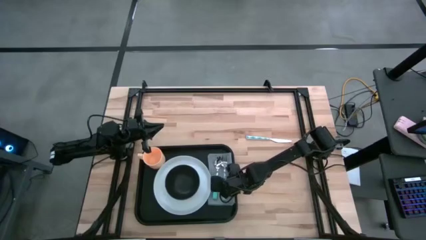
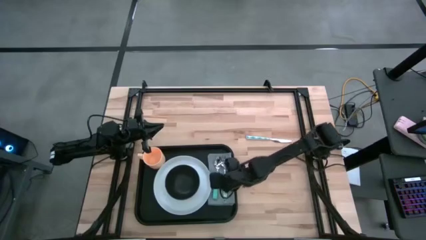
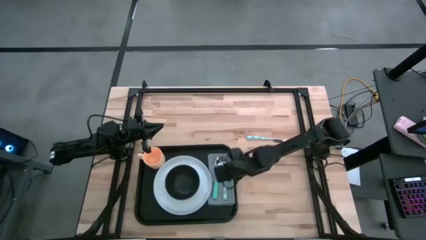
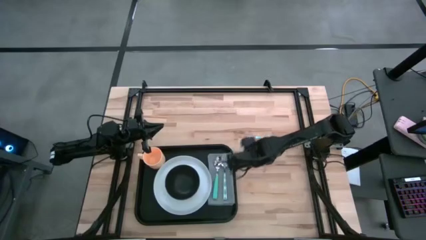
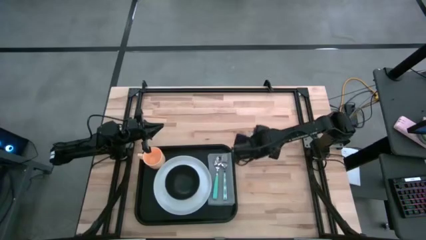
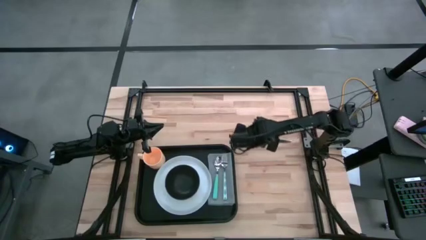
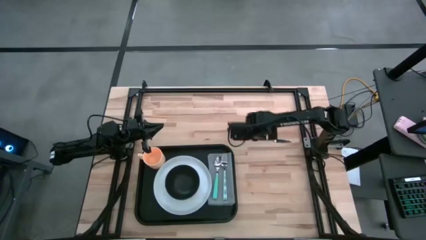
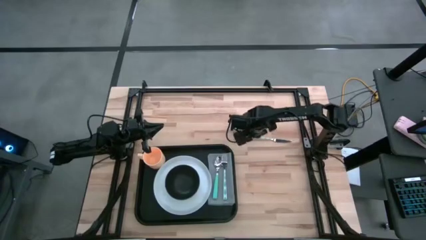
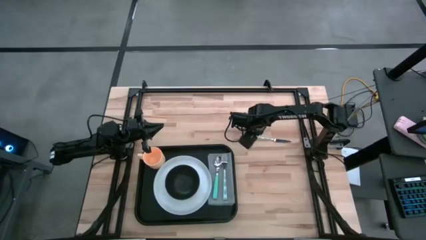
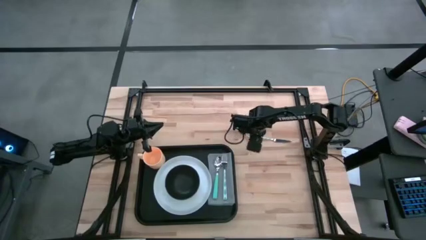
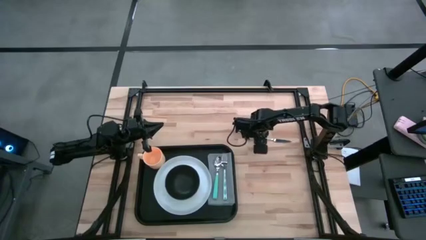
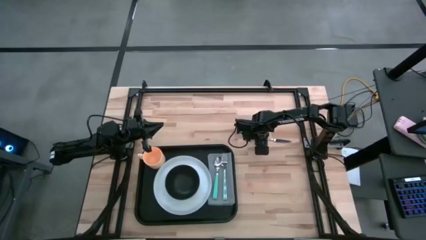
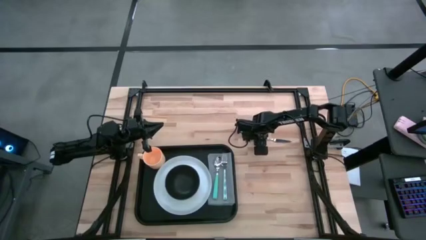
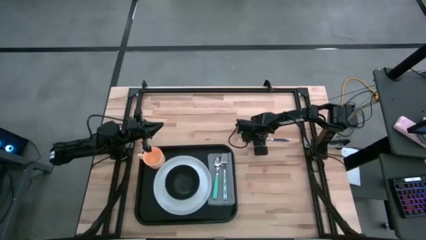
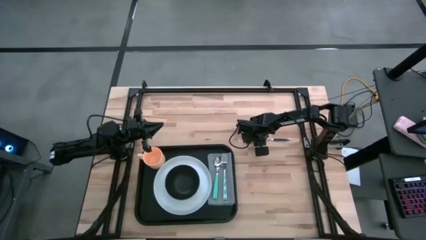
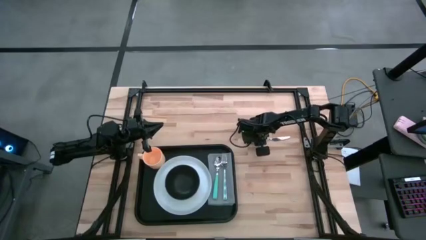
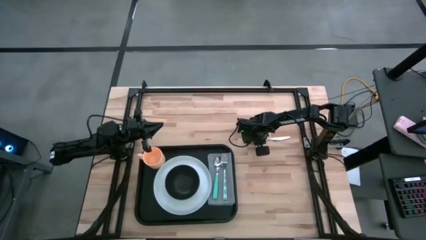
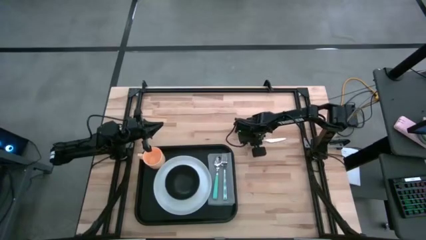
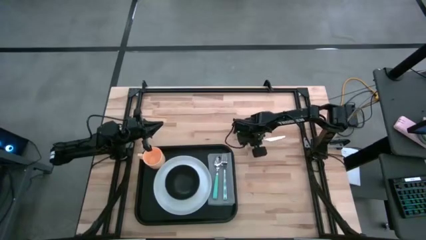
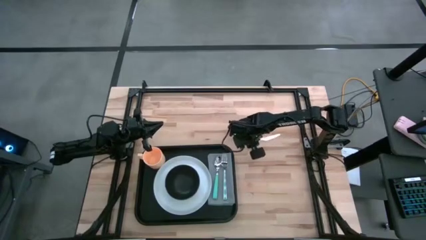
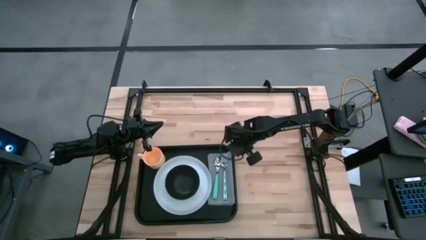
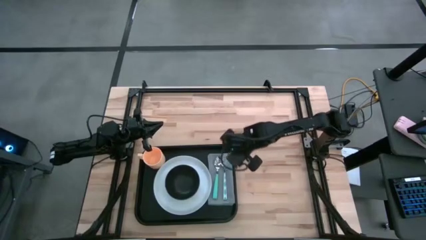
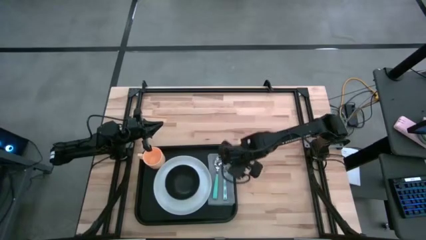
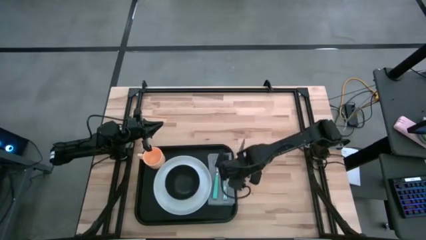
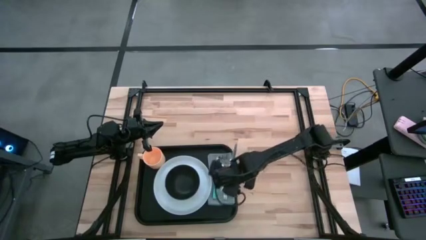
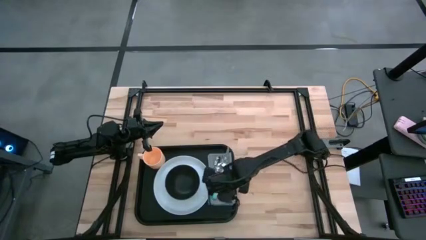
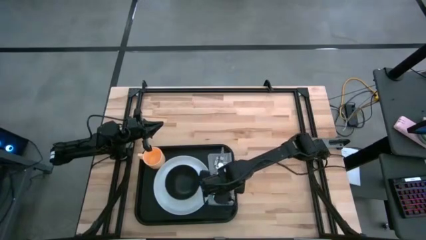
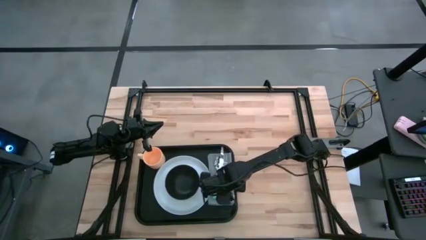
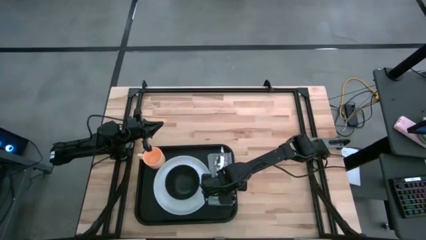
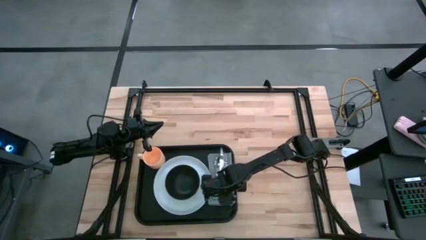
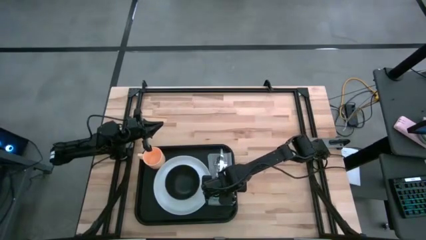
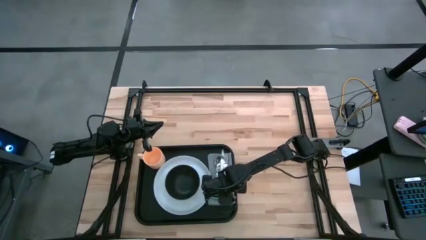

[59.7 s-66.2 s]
Task: Set up tray
Put the white and green knife on the gray napkin to the left of the white and green fork

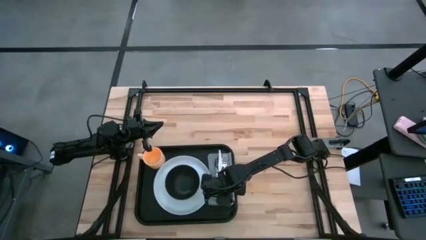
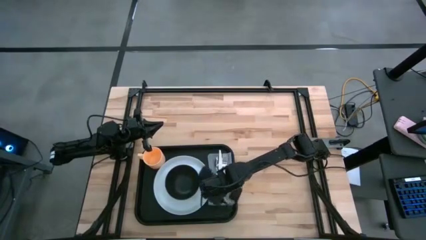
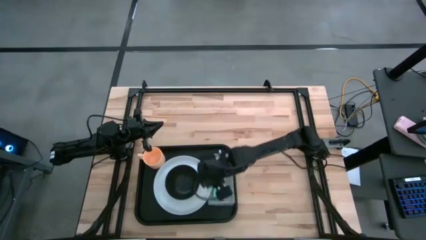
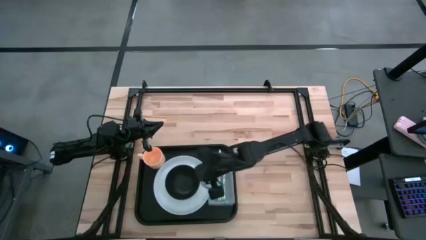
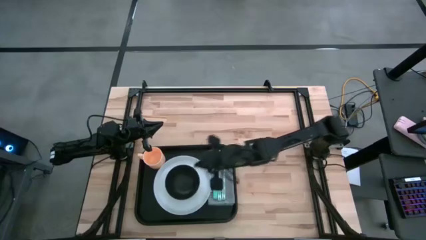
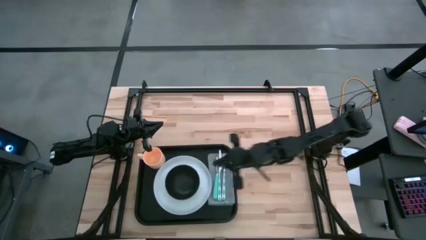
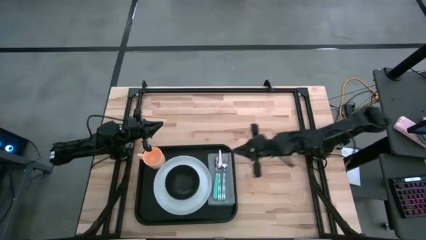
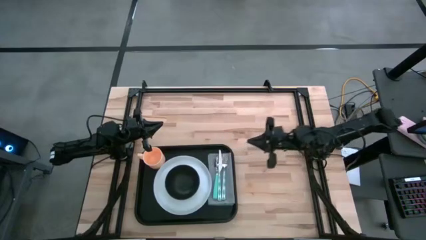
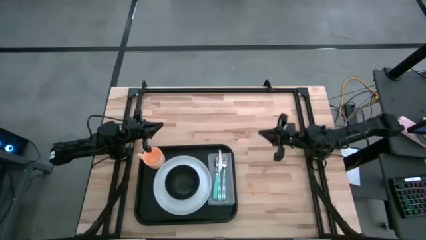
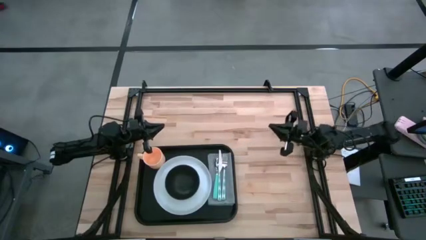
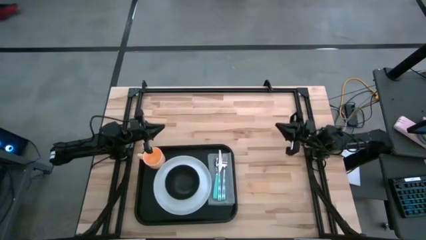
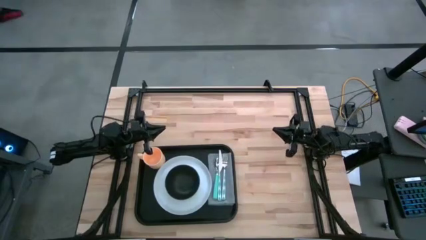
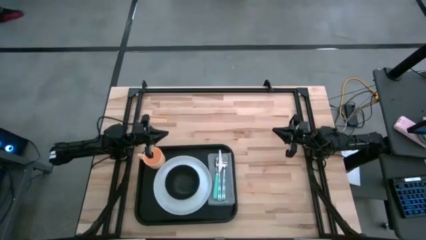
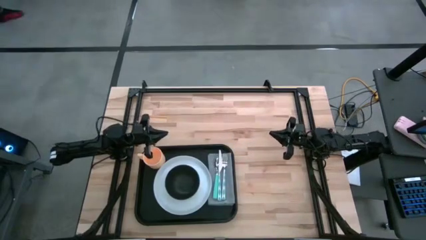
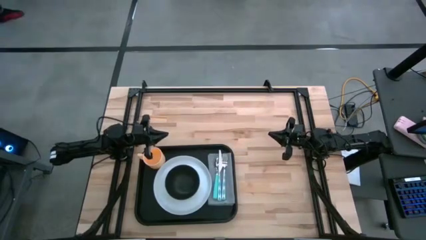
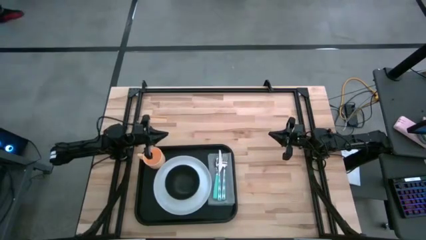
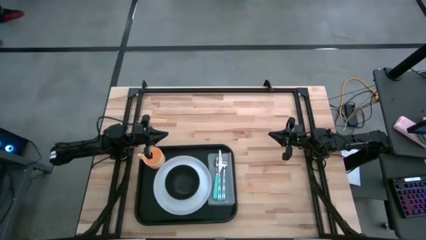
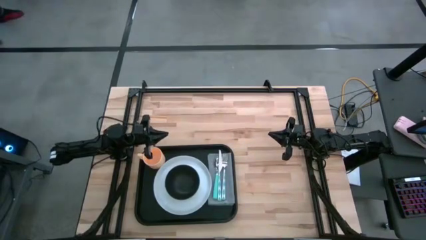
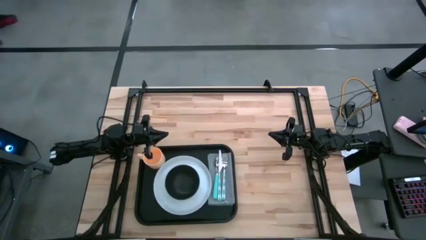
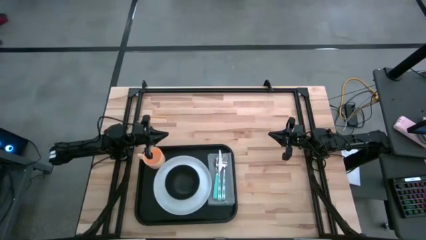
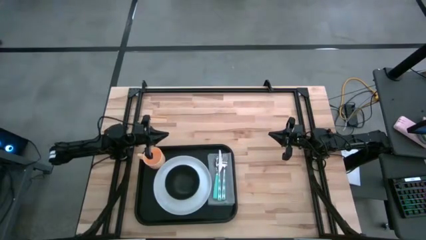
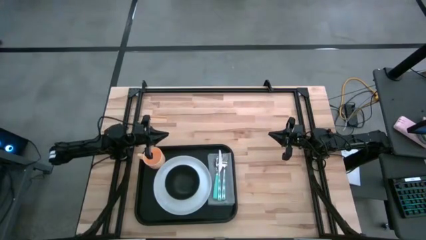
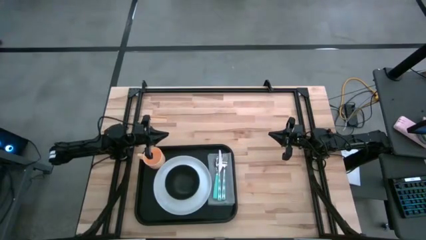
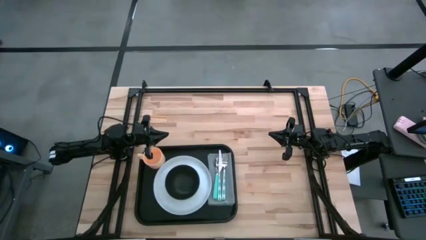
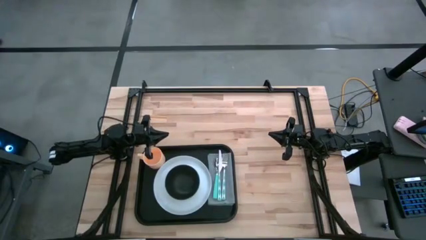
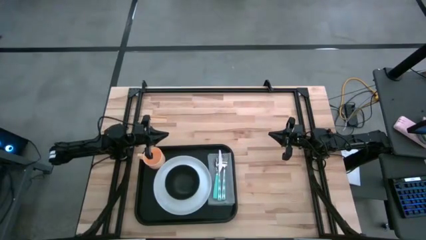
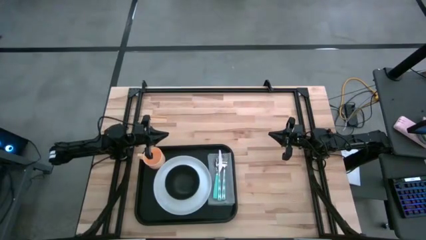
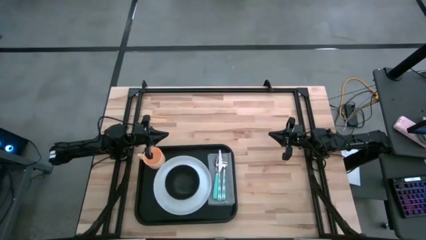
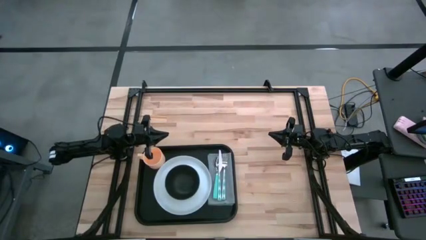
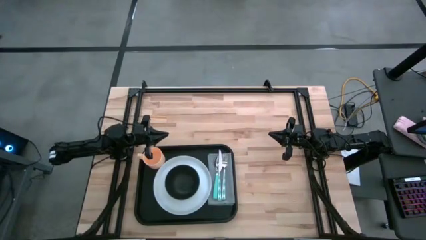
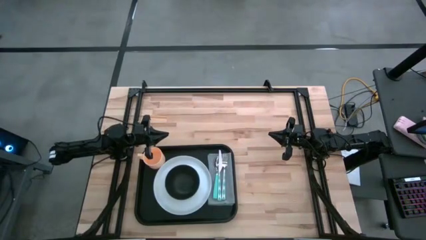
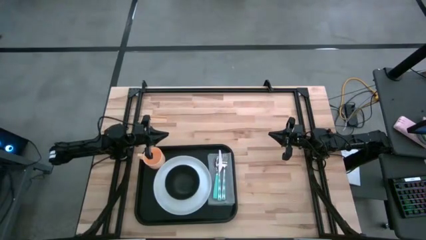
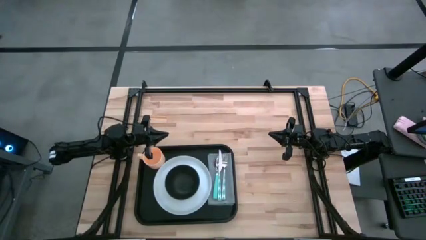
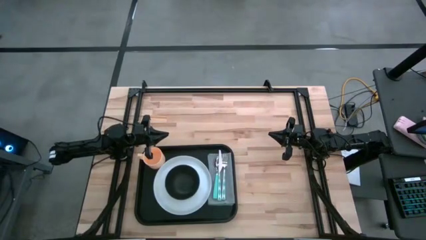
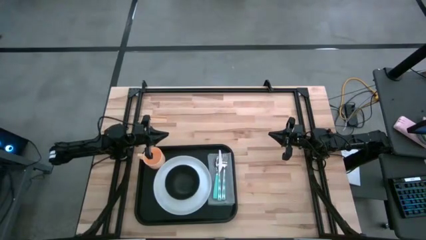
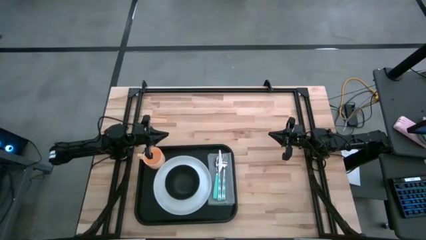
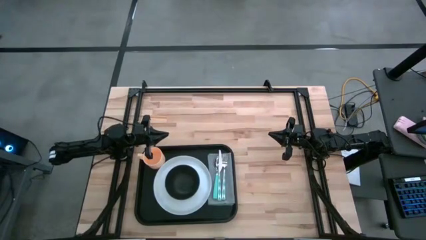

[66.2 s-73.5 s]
Return to Home Position

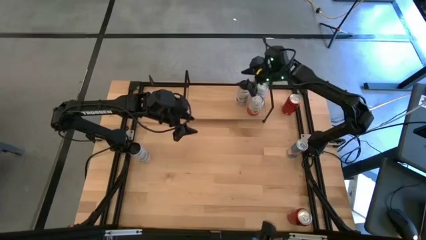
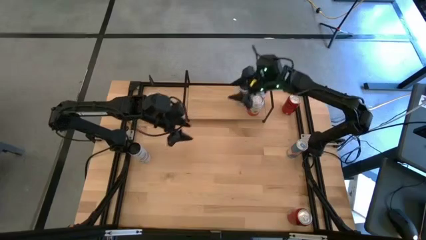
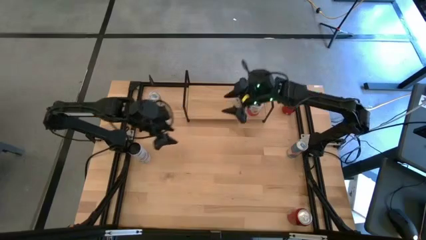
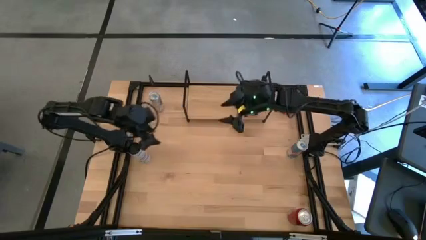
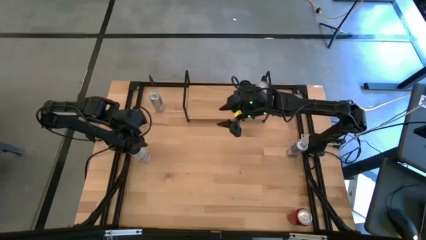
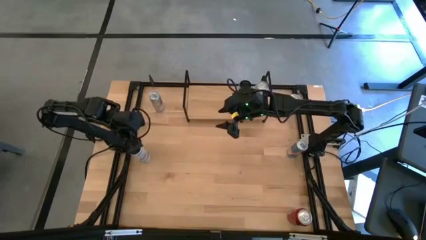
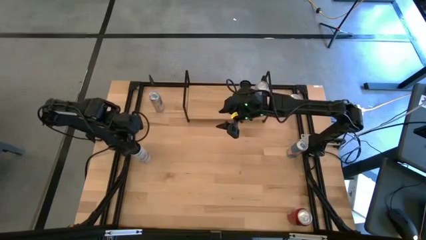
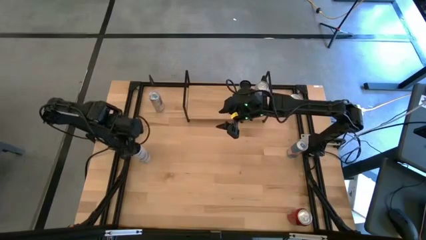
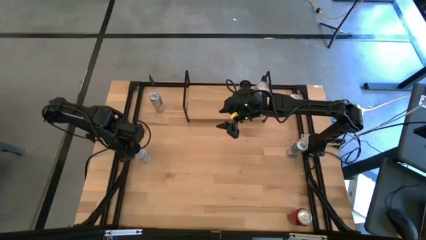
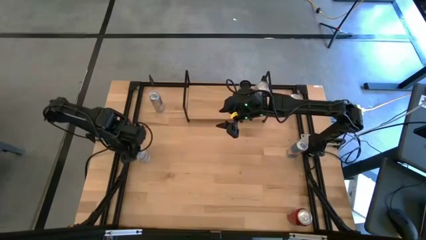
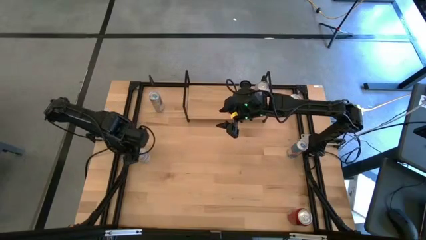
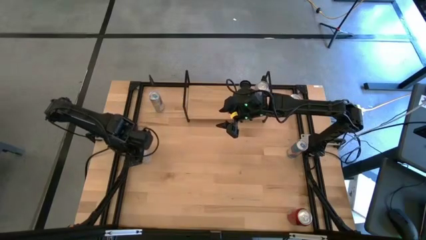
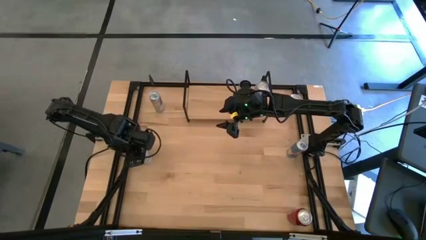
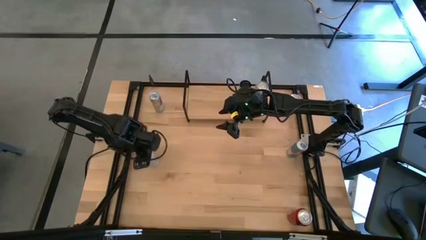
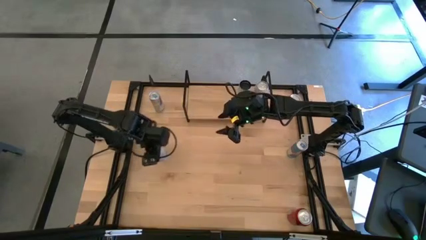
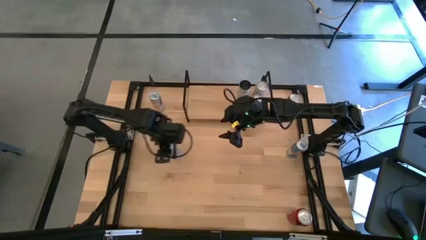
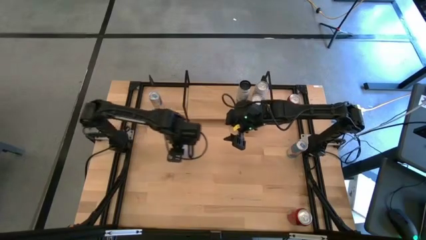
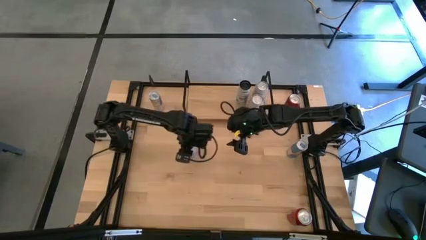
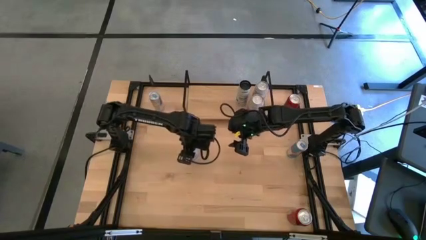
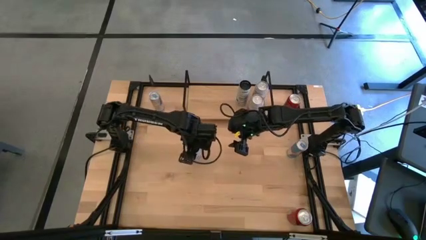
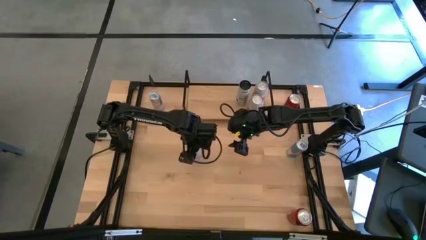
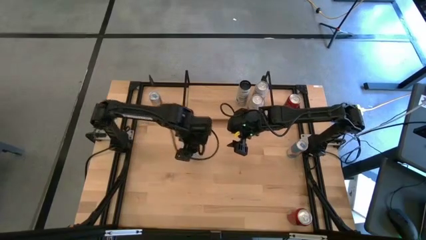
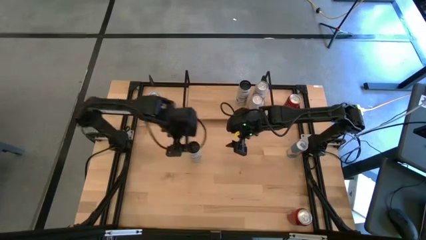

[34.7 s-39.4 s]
Task: Place canned beverage on shelf
Move the white and blue soda can to the center of the table
